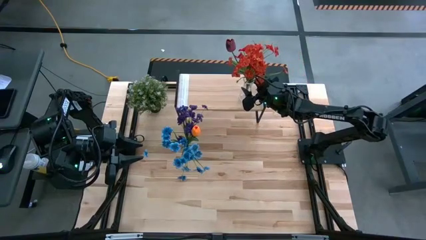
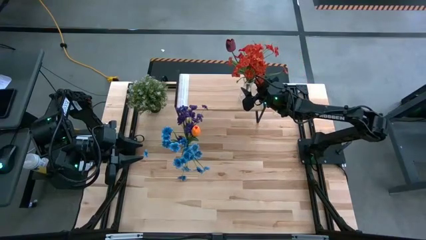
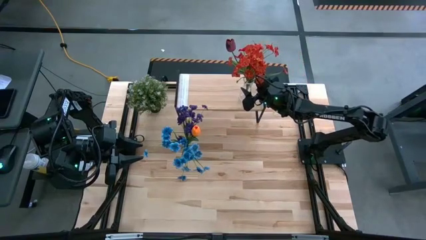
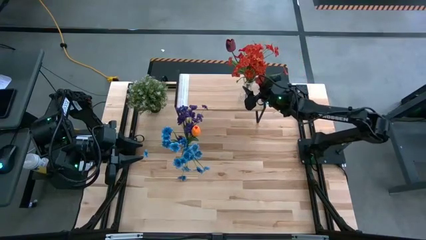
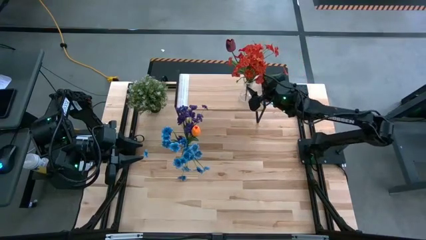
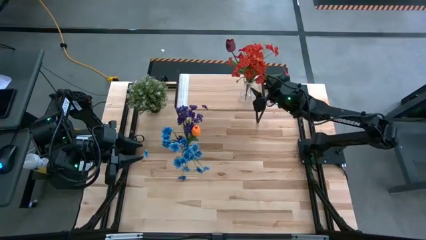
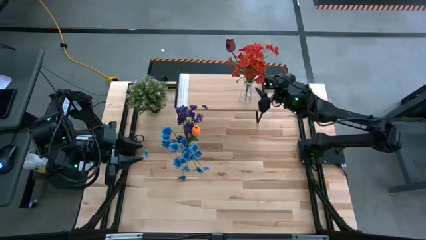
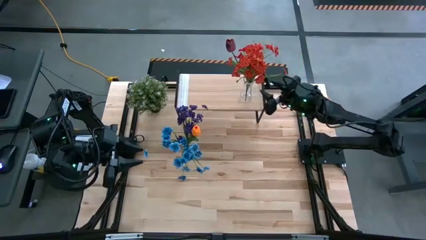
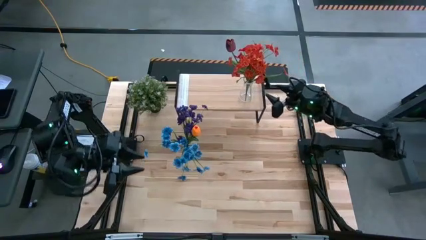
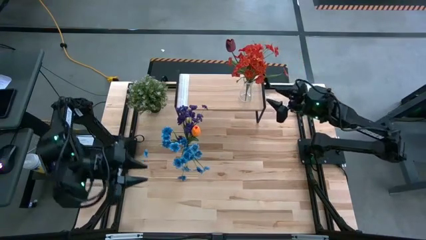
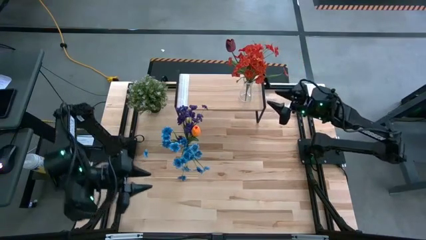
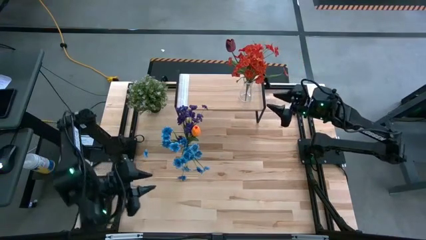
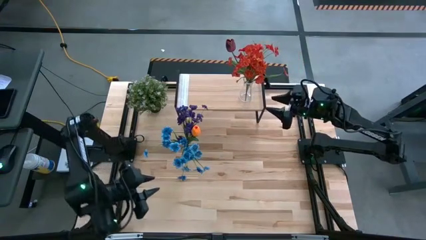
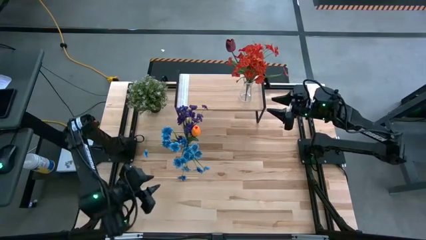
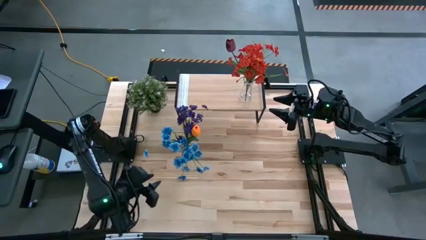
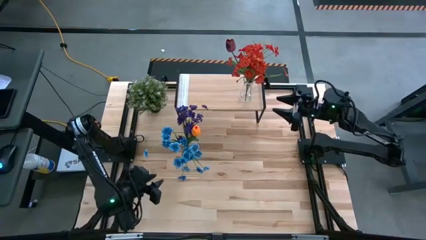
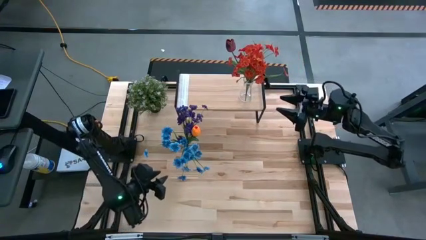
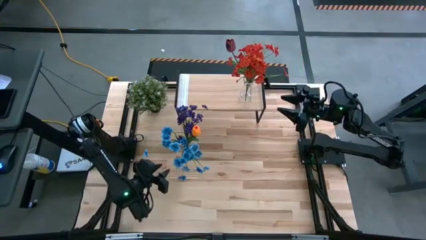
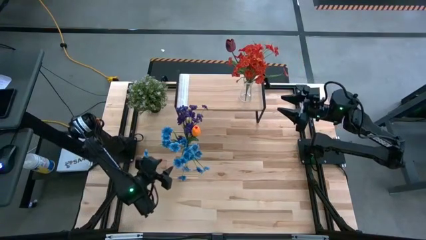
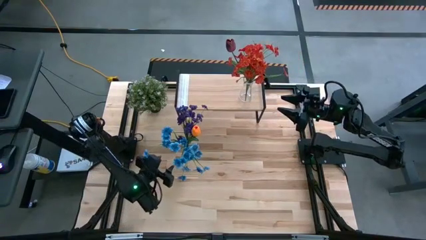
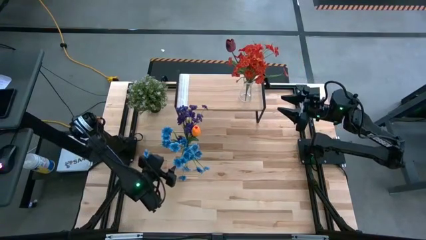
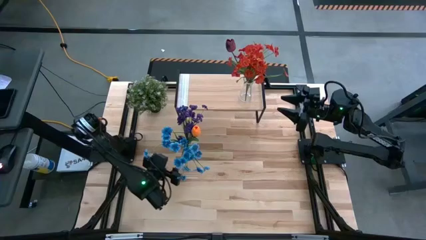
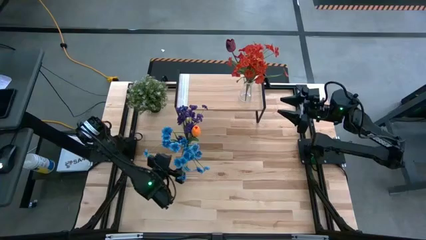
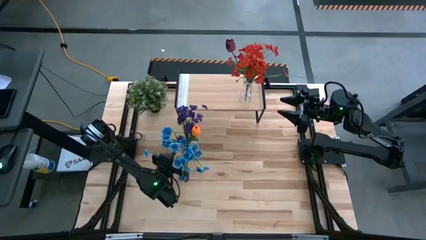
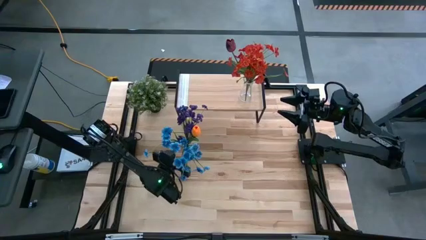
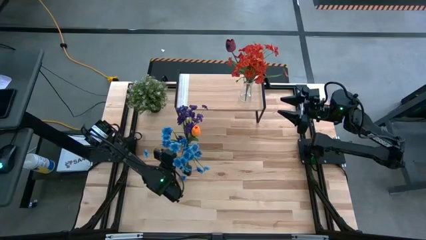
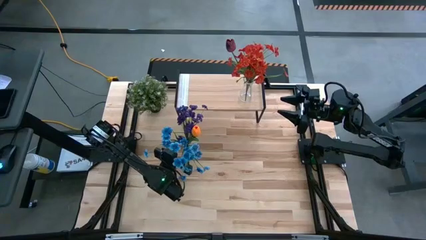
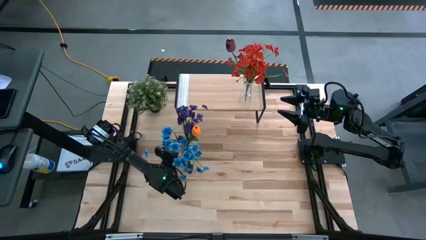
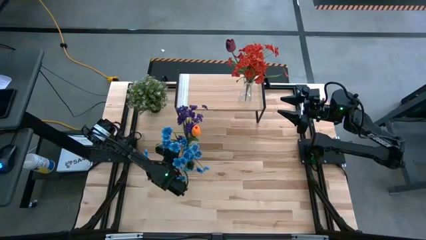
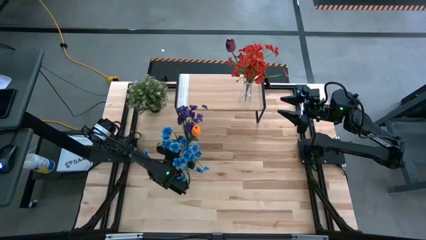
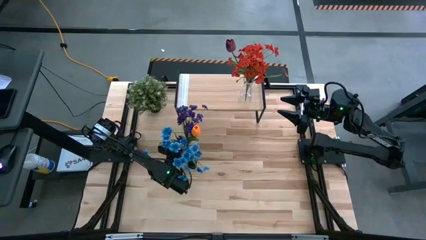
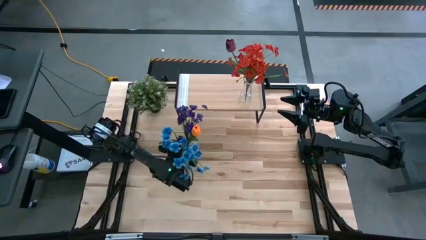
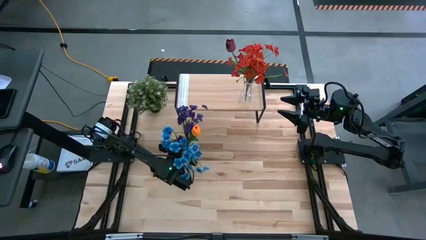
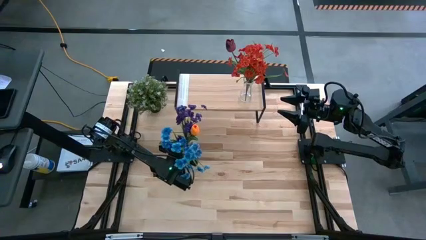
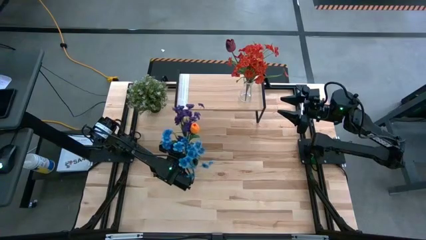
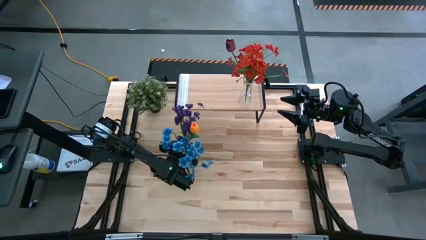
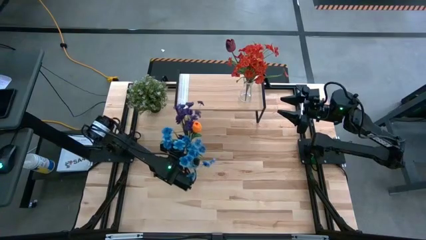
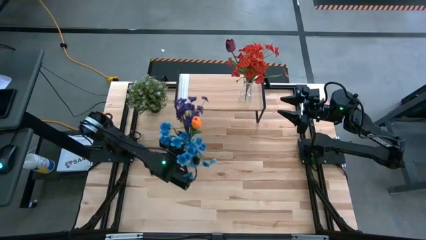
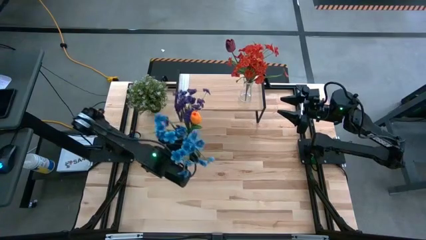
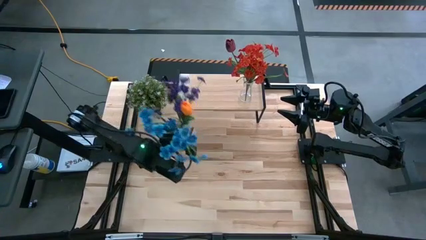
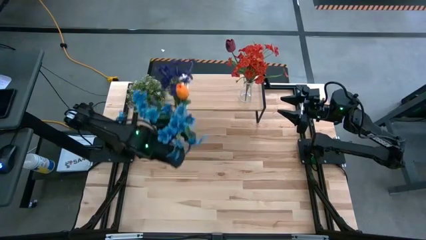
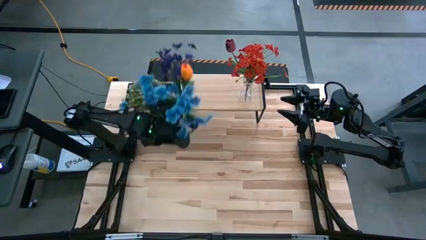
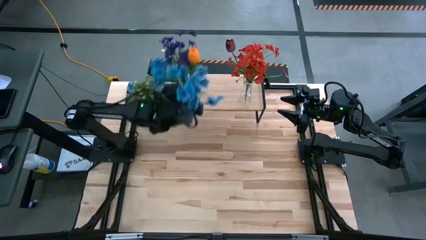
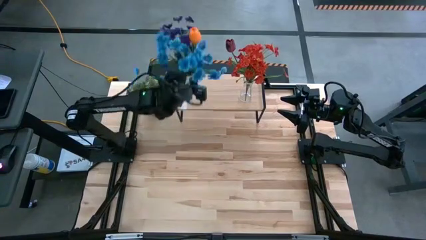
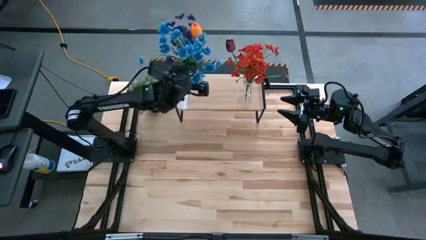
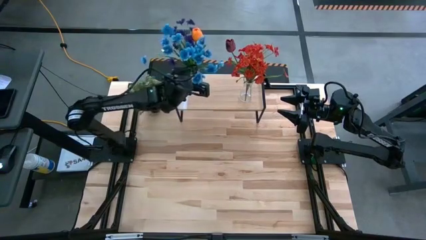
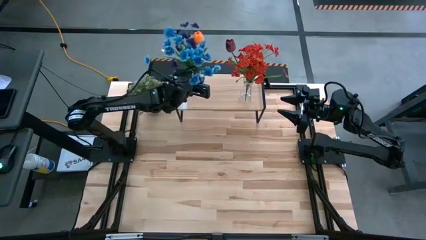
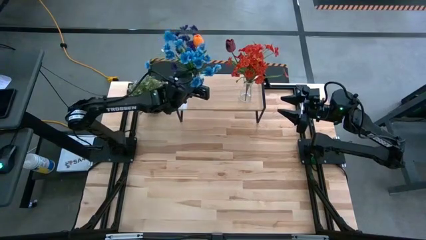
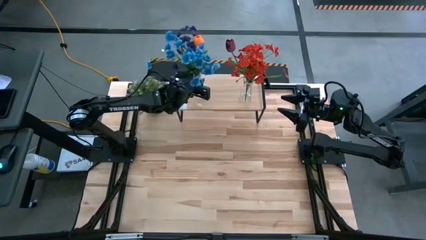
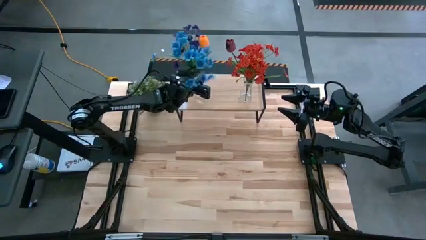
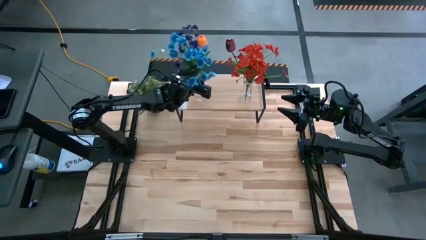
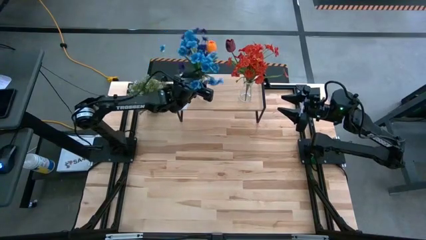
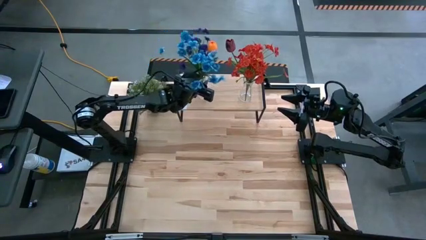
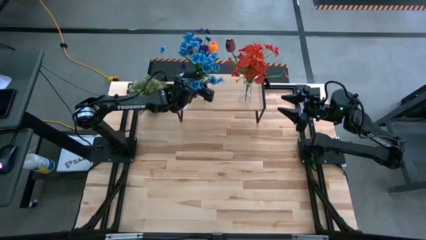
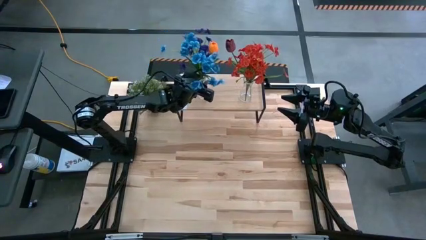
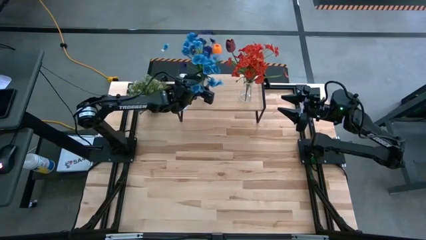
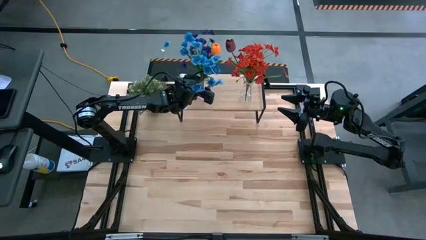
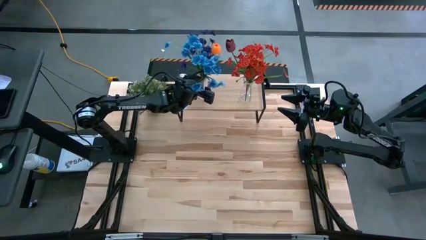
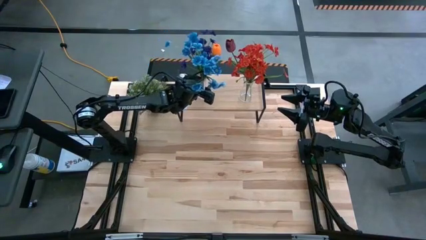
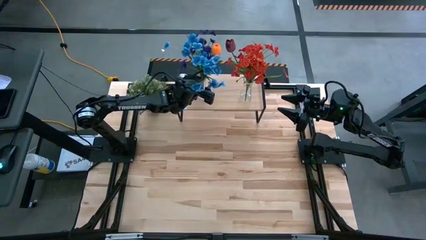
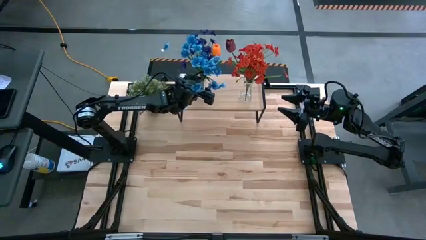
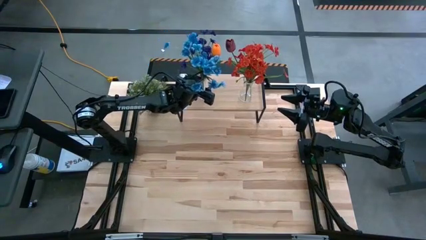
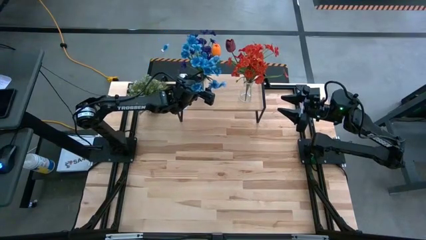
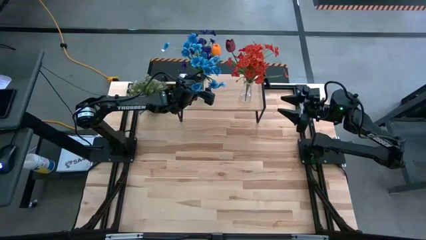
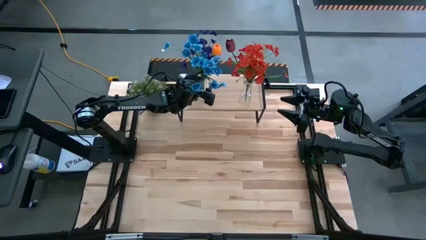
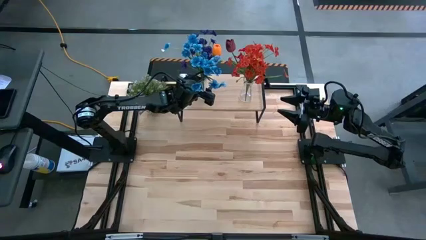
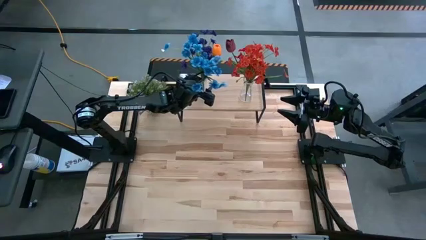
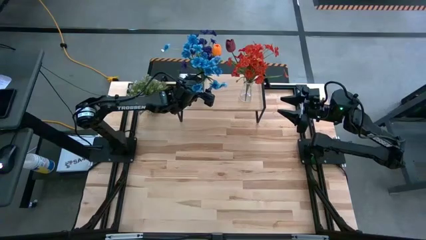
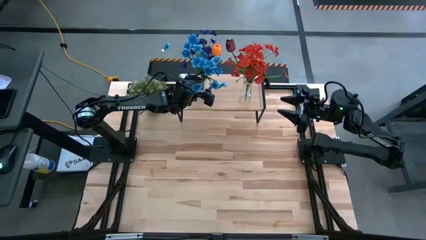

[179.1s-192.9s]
Task: Pick and place flowers into a vace then onto a shelf
Put the transparent flower vase on the shelf
